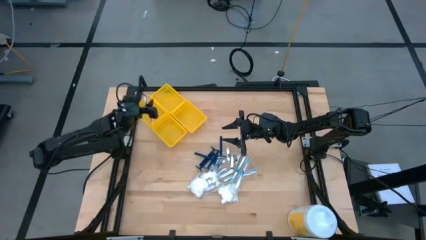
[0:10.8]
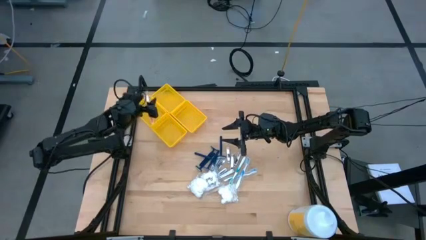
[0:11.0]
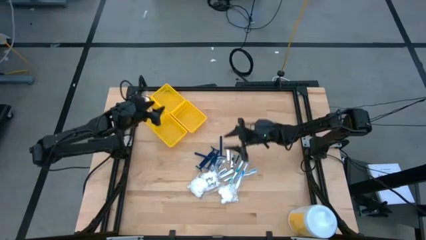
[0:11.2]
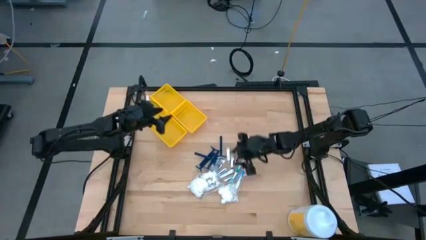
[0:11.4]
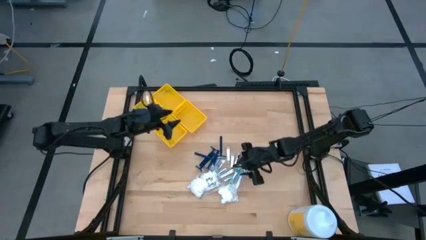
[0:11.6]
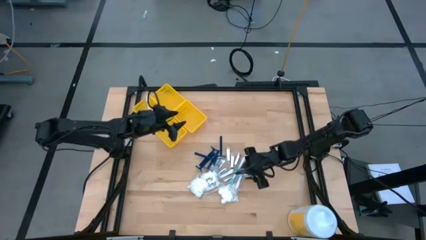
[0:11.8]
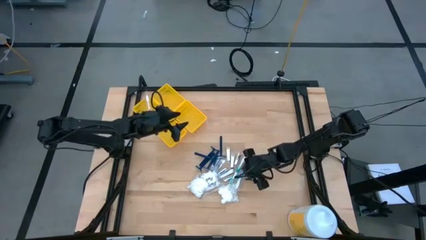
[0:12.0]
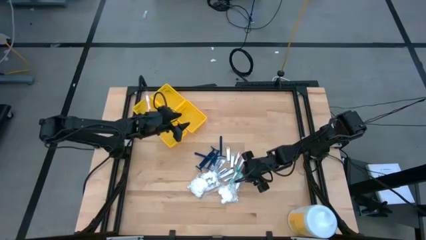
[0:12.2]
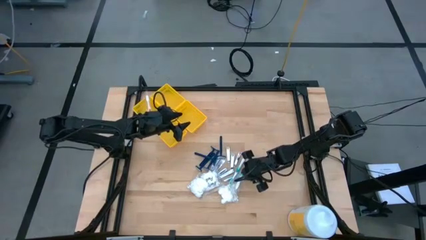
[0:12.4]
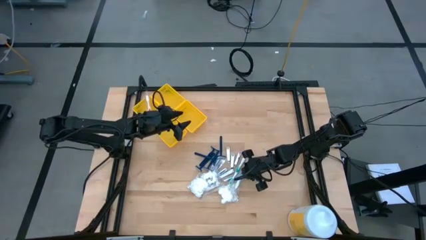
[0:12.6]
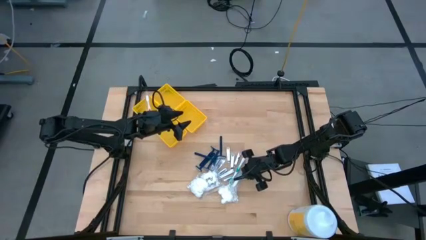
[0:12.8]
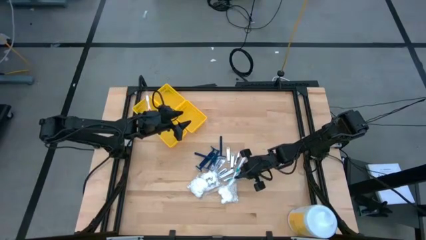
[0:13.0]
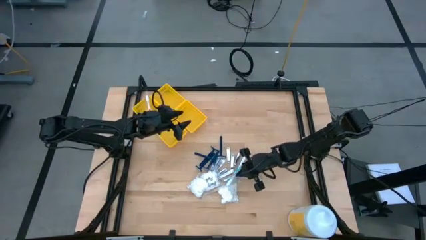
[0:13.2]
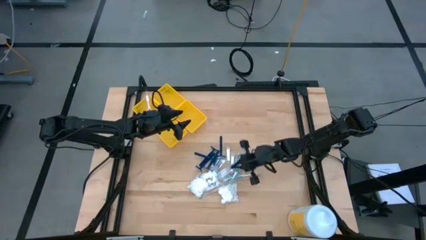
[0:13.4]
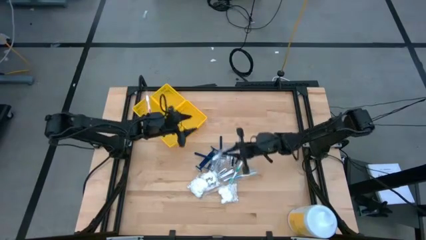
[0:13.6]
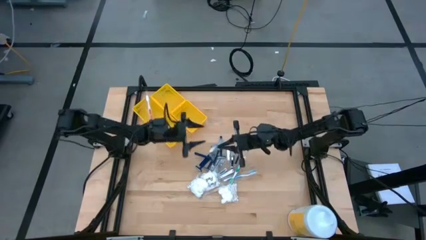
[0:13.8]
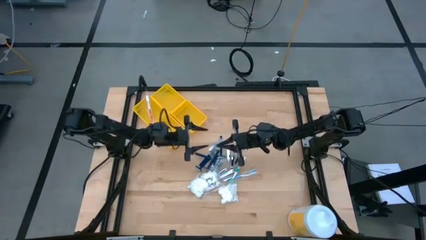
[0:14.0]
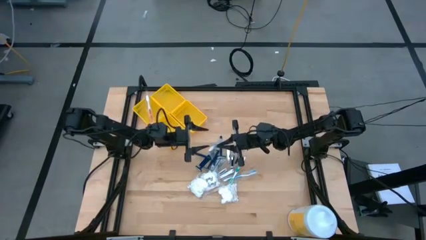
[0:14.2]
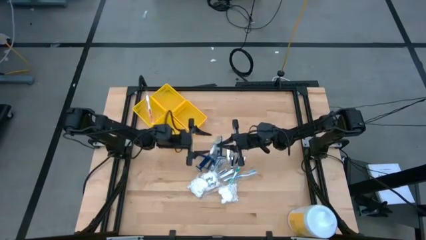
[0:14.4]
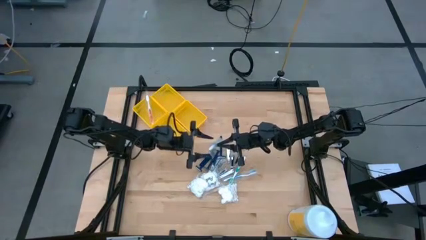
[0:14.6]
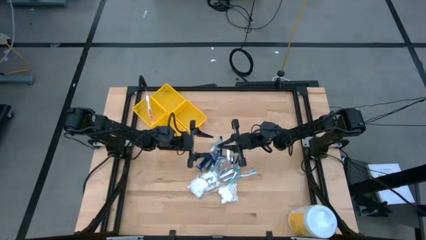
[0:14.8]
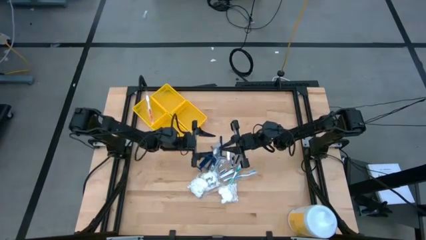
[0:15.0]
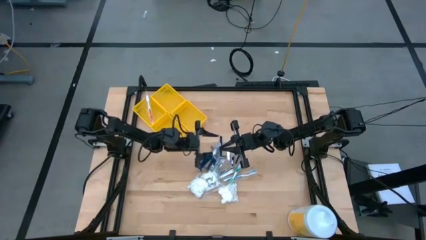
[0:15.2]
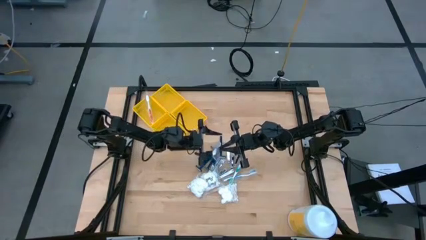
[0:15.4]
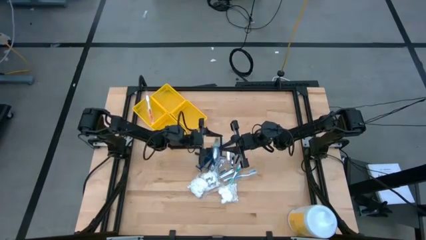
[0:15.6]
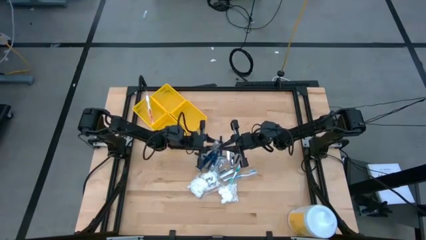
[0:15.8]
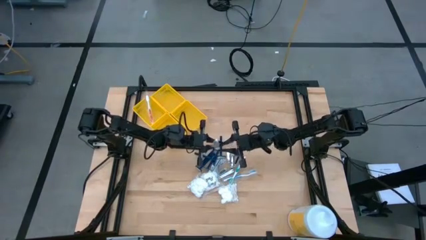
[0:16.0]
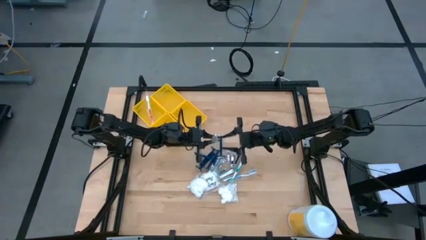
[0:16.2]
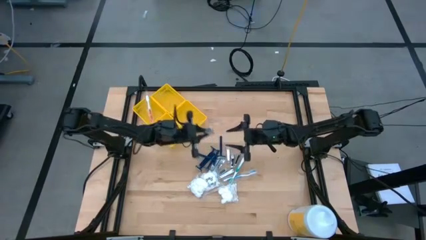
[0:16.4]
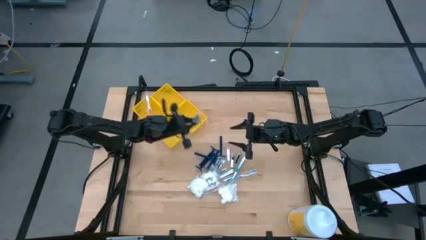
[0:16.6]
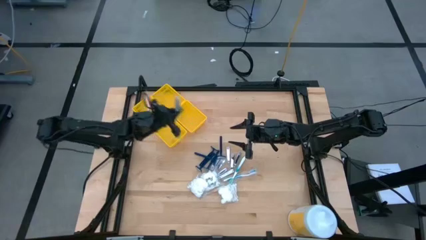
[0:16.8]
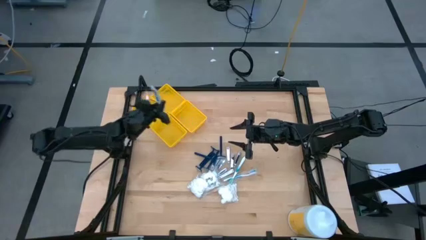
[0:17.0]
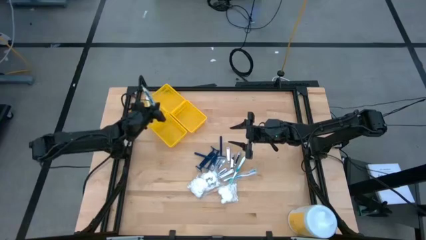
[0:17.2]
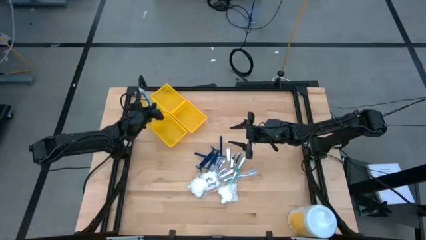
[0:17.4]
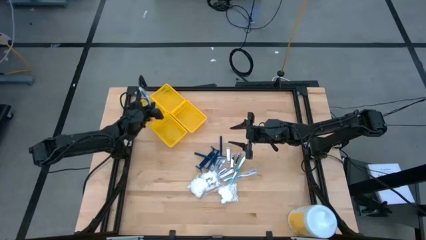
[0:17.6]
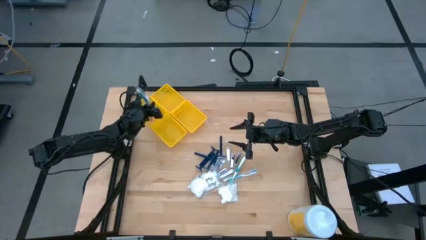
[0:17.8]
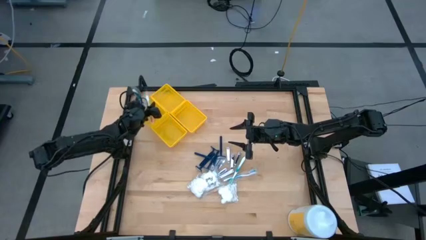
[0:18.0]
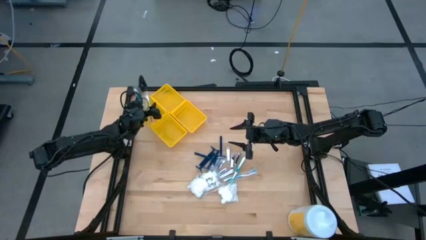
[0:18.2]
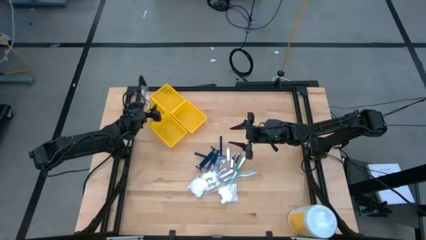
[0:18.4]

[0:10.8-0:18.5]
Task: Pick & Place Travel size toiletries
Put the blue toothbrush into the middle left yellow bin

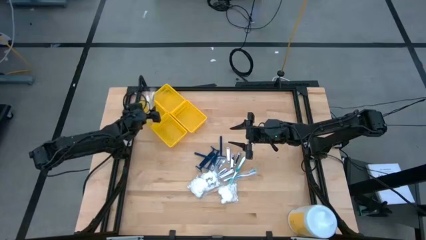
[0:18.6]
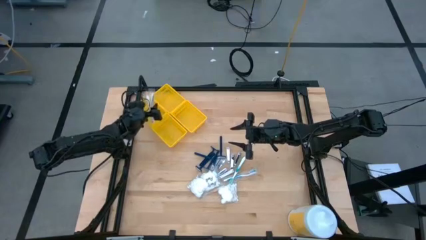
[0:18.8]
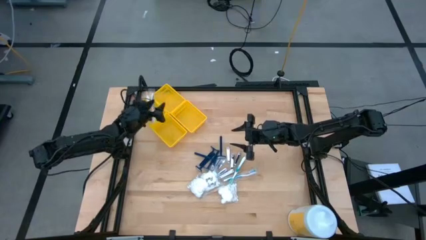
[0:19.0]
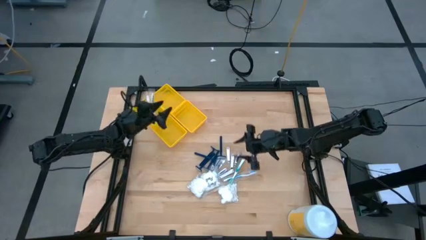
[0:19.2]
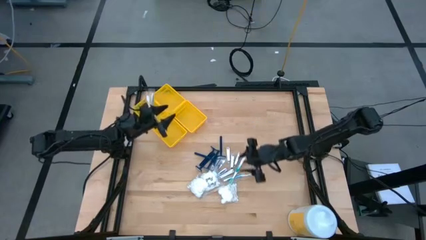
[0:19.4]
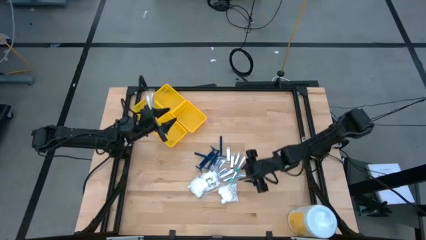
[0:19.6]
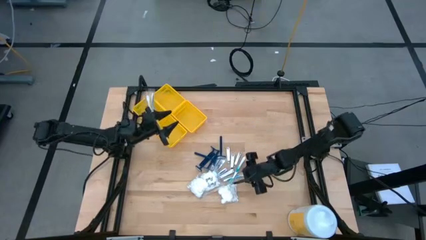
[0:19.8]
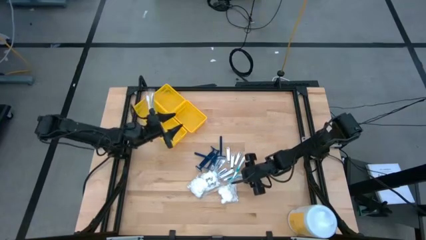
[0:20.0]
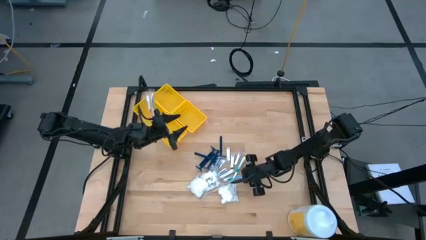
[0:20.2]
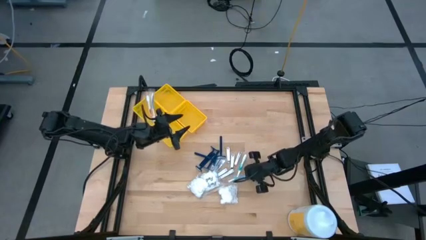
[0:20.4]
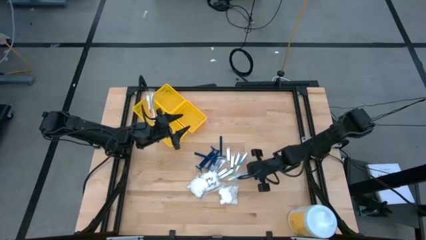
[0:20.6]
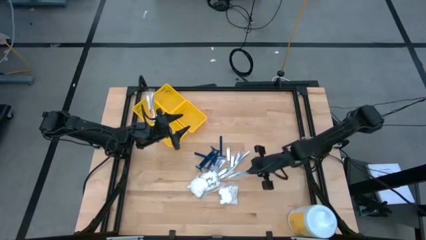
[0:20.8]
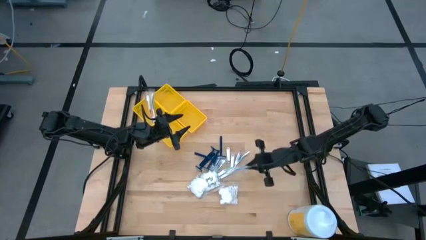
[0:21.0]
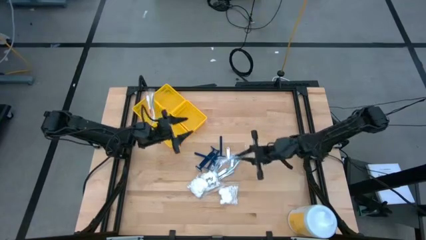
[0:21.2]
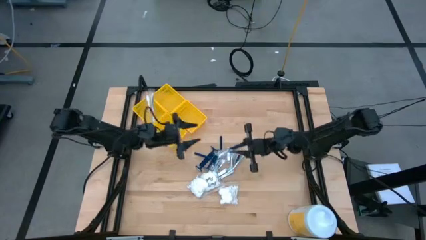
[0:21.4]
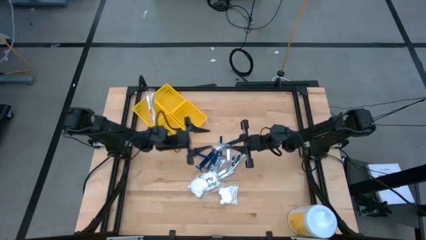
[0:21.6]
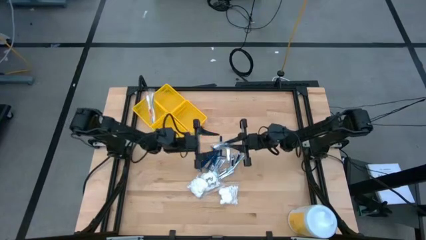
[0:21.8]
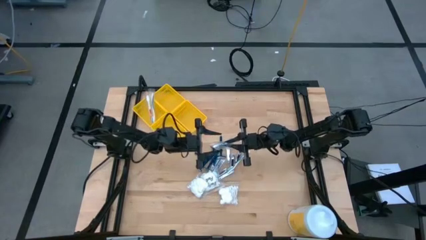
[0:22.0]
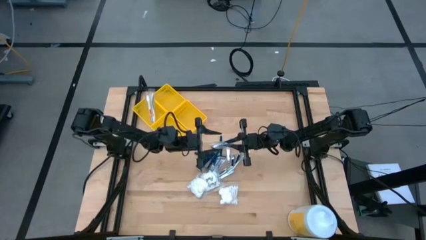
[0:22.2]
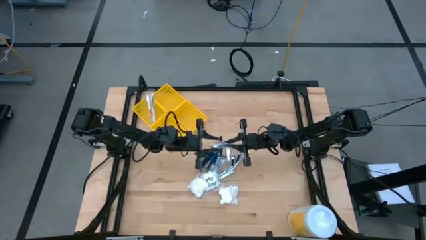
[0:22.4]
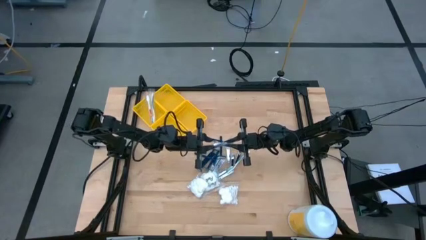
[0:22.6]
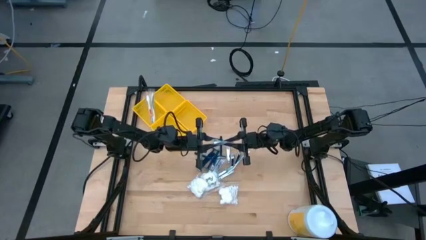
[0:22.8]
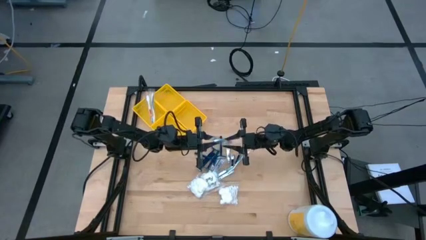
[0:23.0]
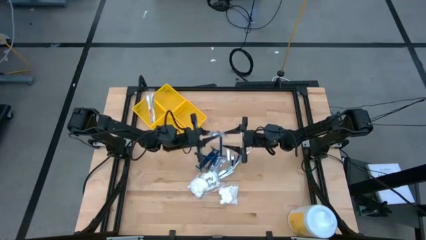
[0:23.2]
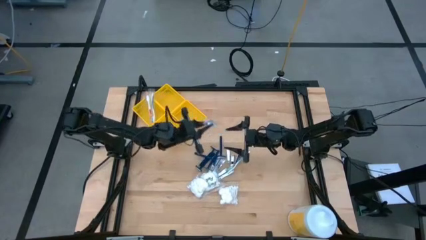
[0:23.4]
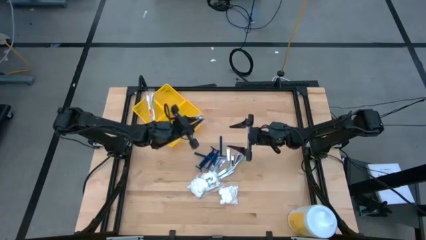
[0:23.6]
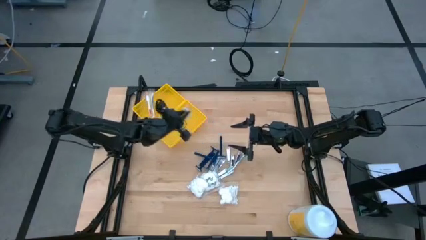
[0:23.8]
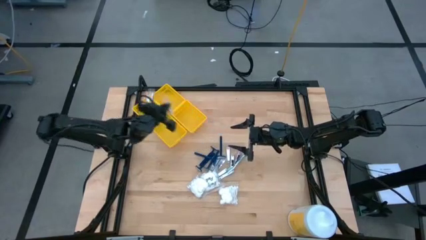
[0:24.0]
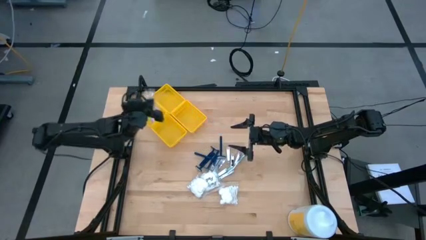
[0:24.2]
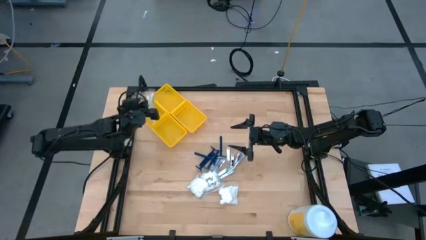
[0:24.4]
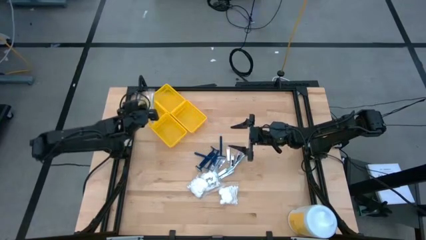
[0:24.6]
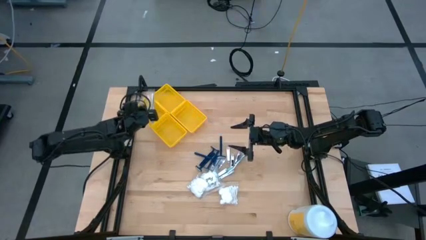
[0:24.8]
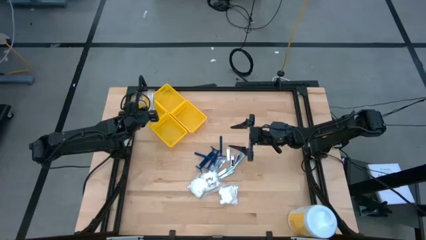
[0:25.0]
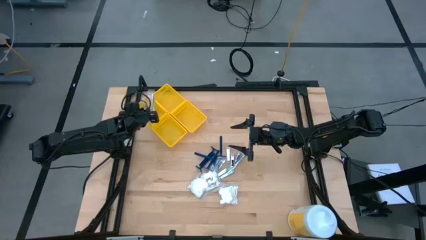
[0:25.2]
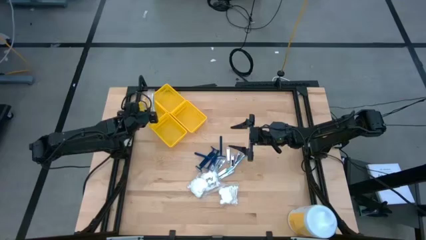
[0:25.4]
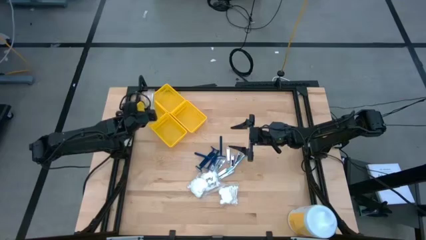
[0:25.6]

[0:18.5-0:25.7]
Put the blue toothbrush into the middle left yellow bin
